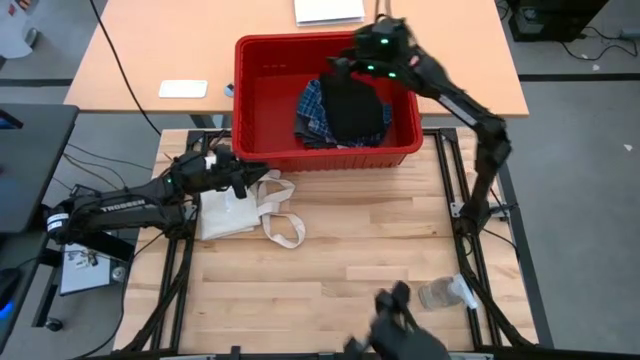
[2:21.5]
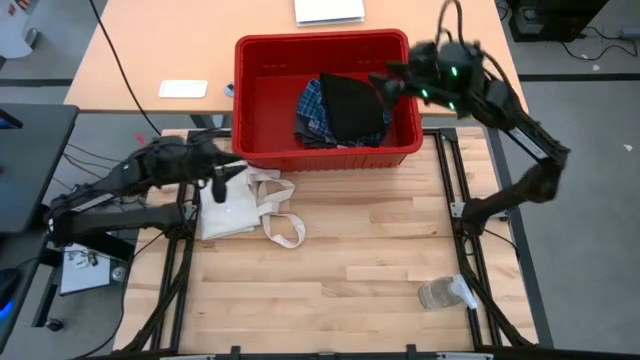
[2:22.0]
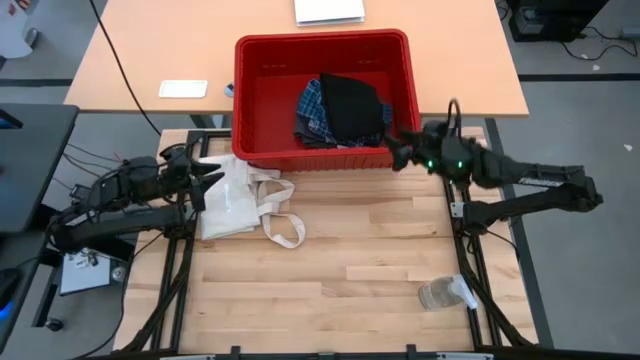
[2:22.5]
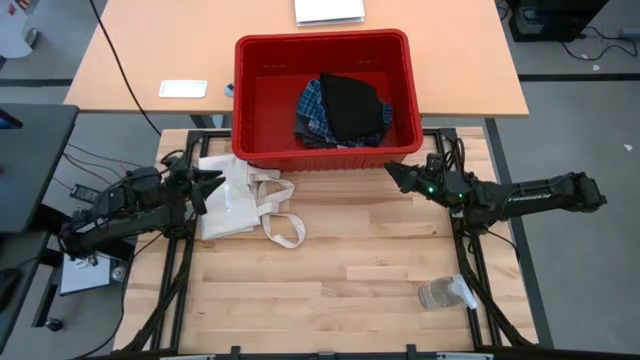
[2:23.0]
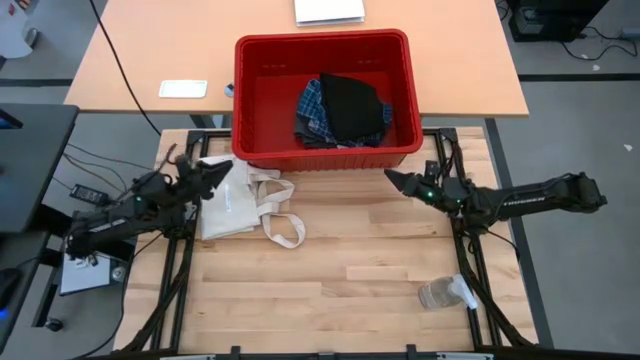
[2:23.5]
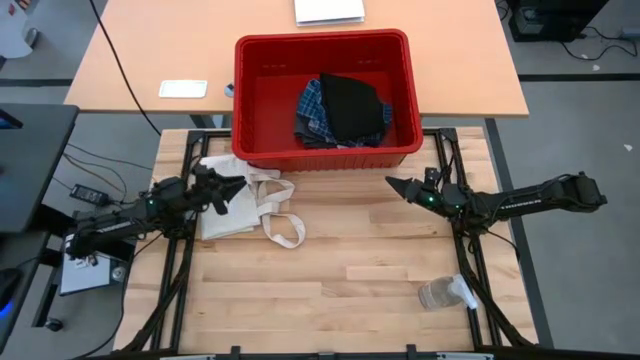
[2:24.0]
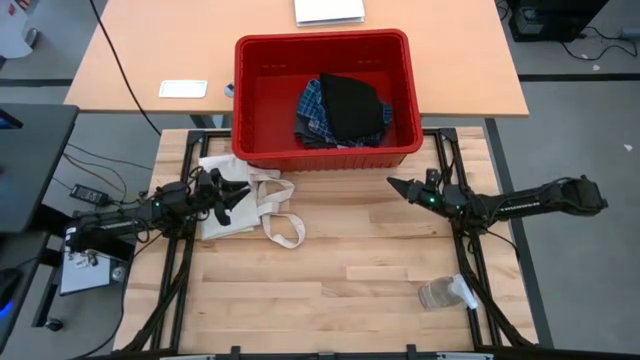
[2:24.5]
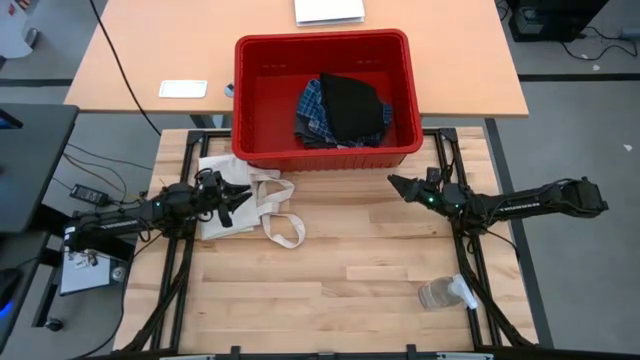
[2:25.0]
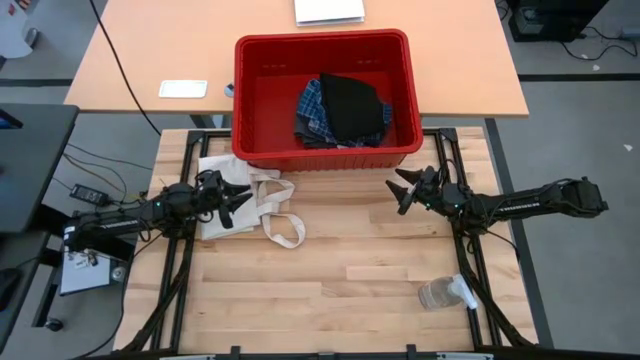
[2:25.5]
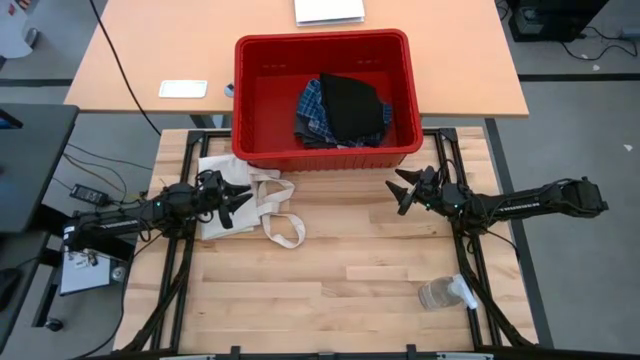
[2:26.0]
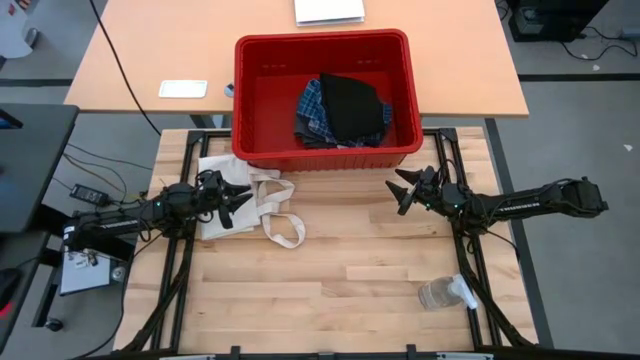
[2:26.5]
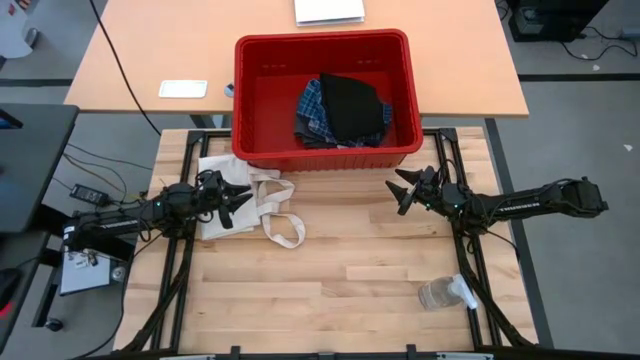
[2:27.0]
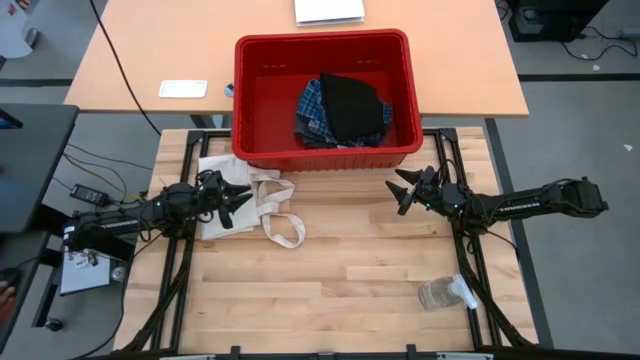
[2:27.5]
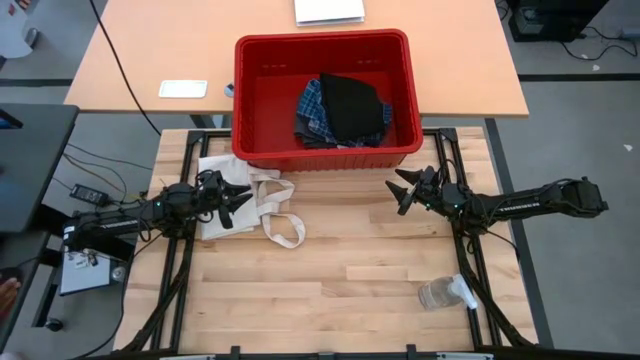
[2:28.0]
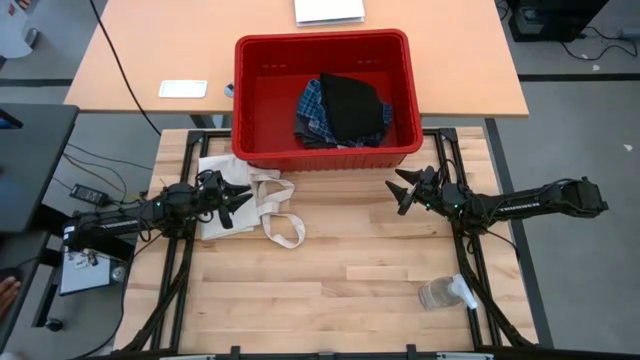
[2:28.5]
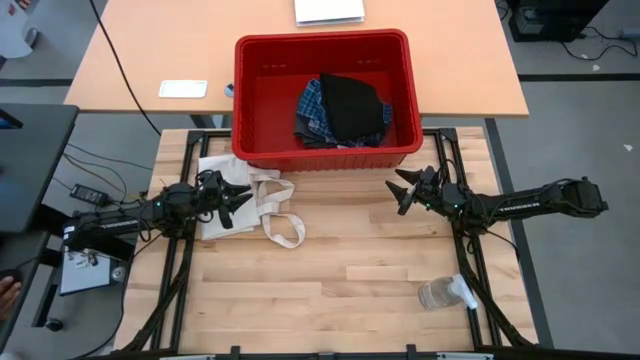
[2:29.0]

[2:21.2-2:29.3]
Task: Fold laundry
Return to Home Position

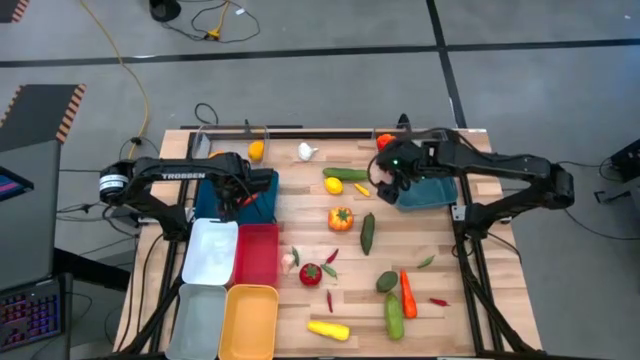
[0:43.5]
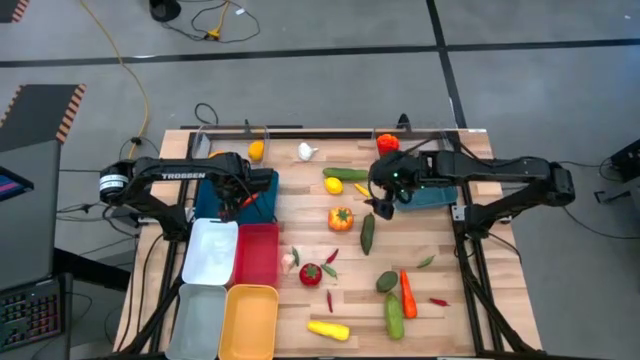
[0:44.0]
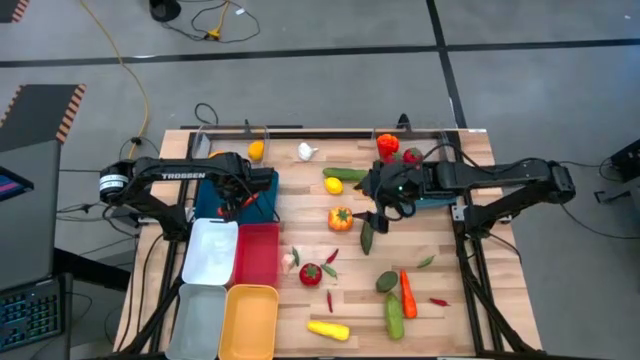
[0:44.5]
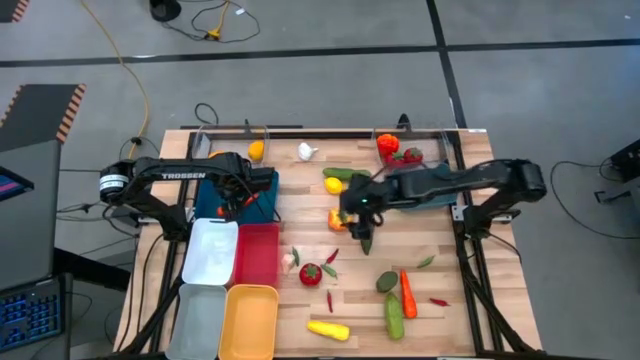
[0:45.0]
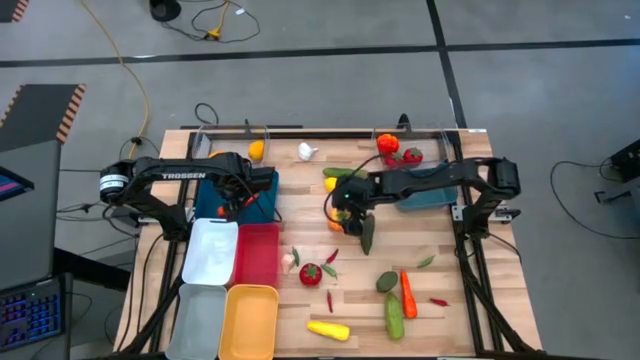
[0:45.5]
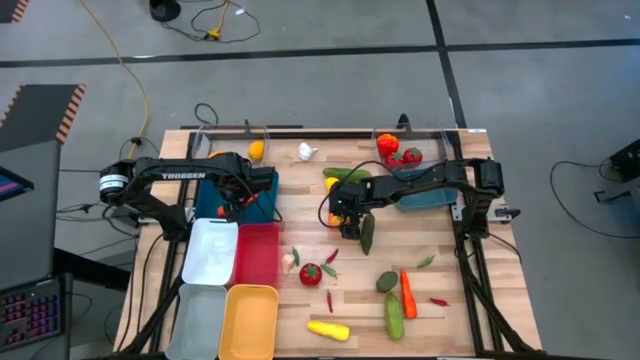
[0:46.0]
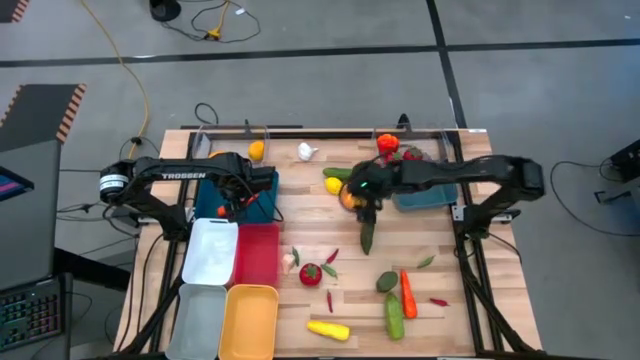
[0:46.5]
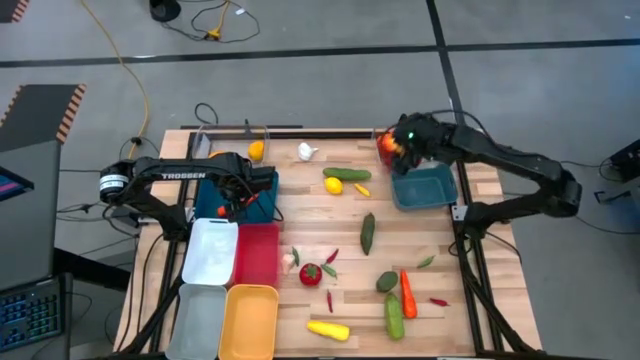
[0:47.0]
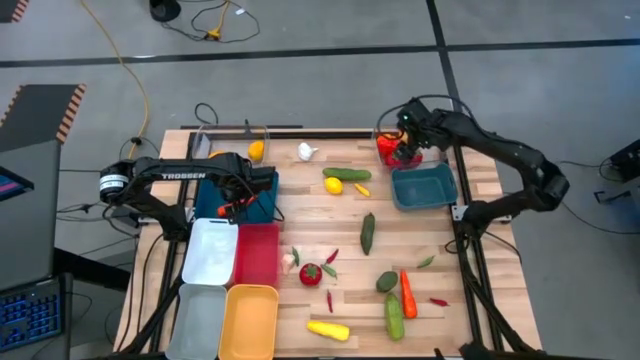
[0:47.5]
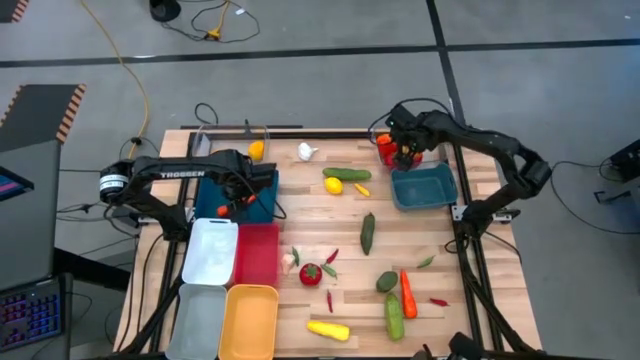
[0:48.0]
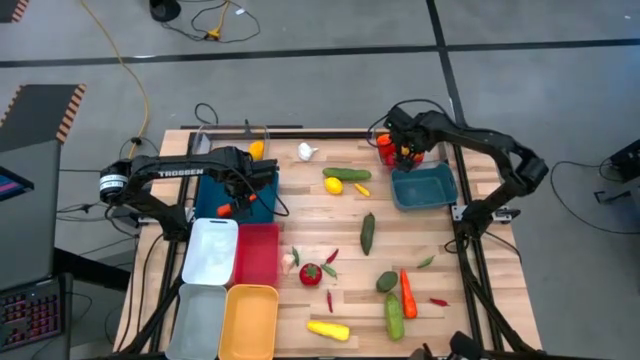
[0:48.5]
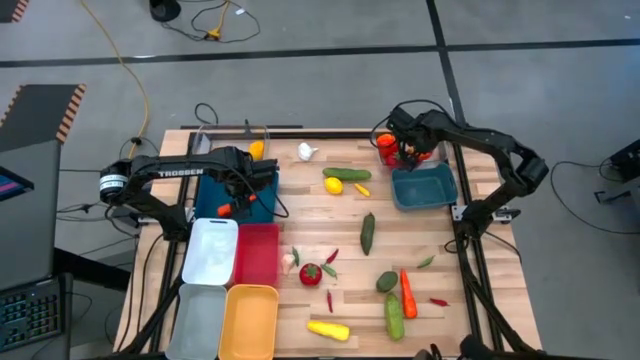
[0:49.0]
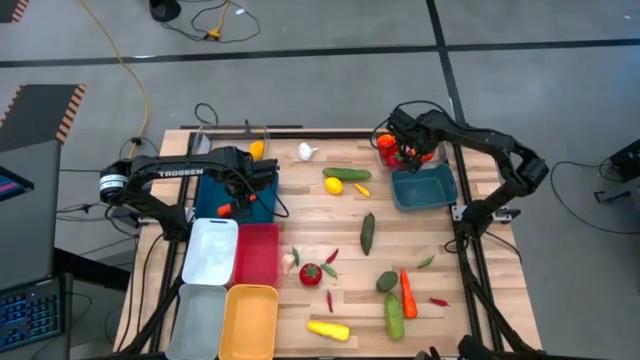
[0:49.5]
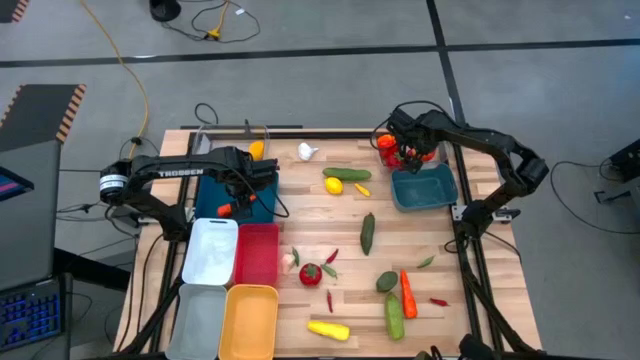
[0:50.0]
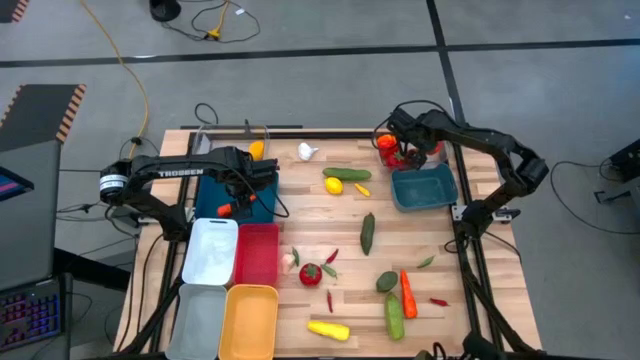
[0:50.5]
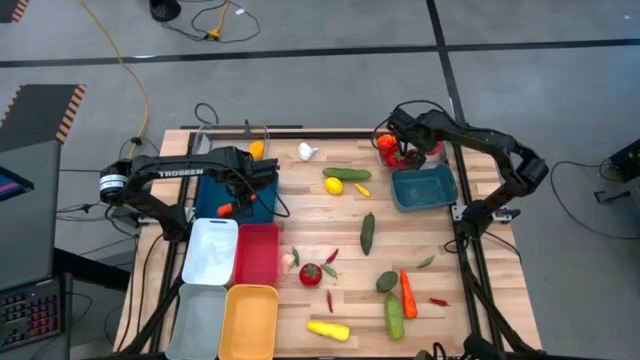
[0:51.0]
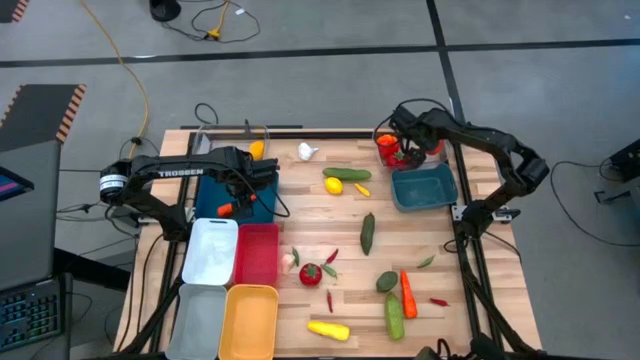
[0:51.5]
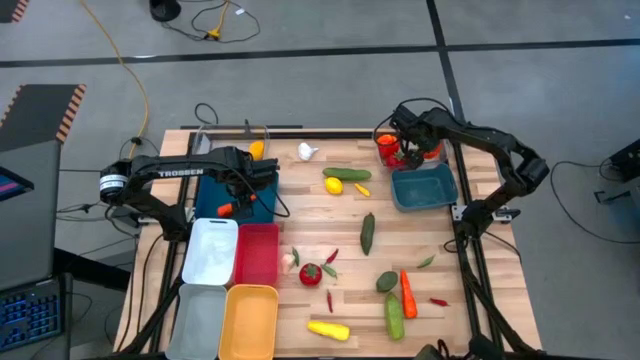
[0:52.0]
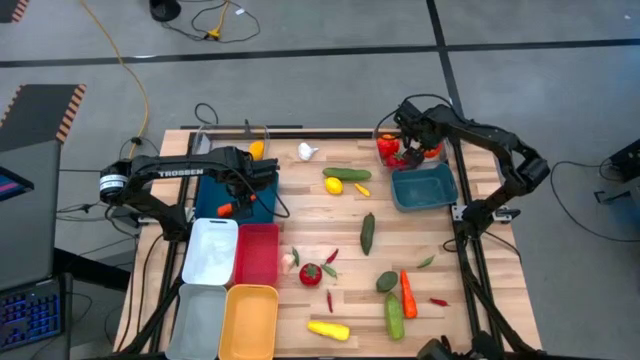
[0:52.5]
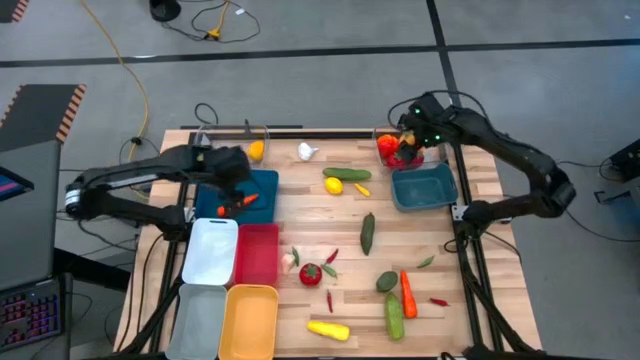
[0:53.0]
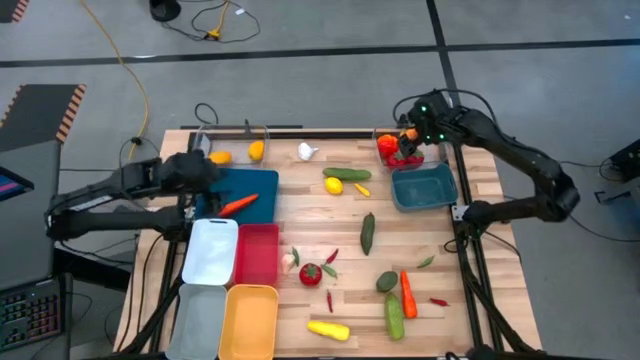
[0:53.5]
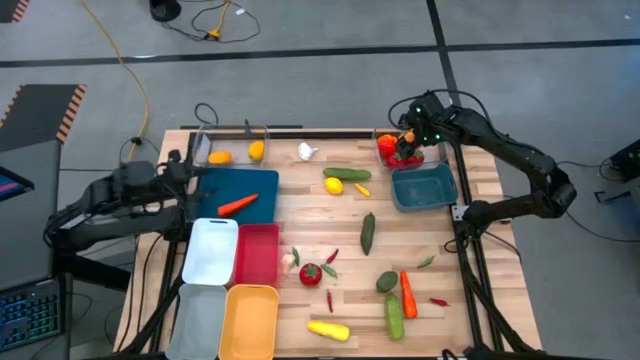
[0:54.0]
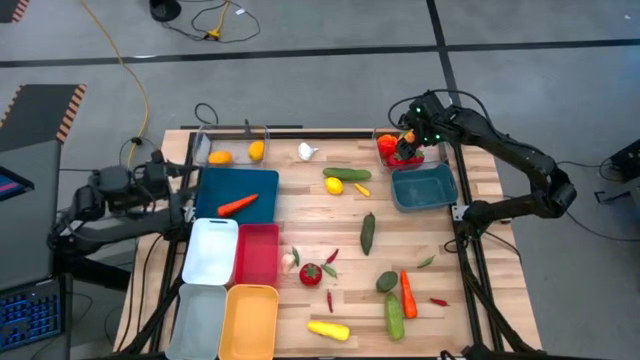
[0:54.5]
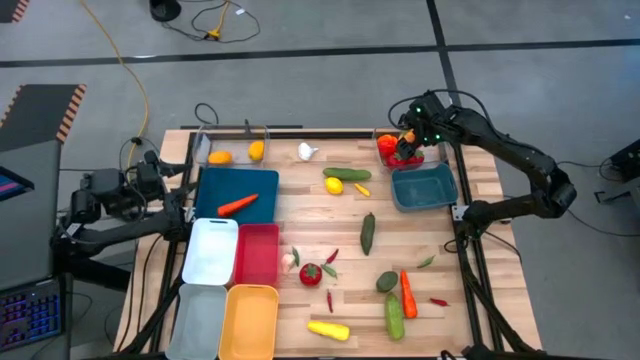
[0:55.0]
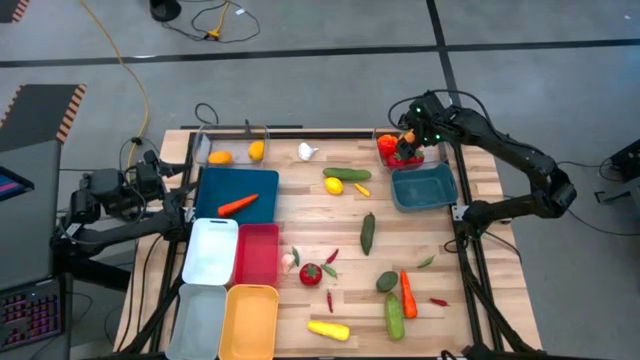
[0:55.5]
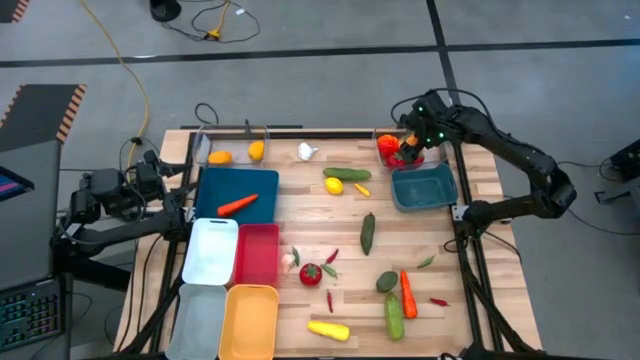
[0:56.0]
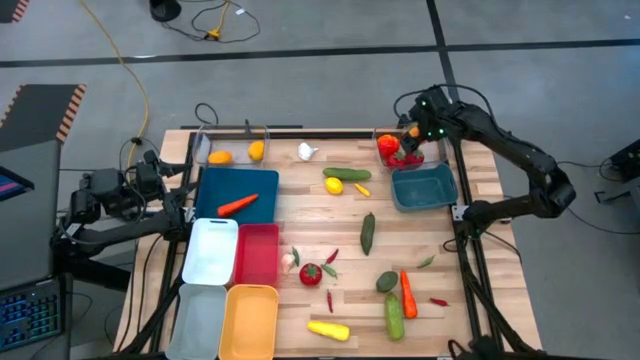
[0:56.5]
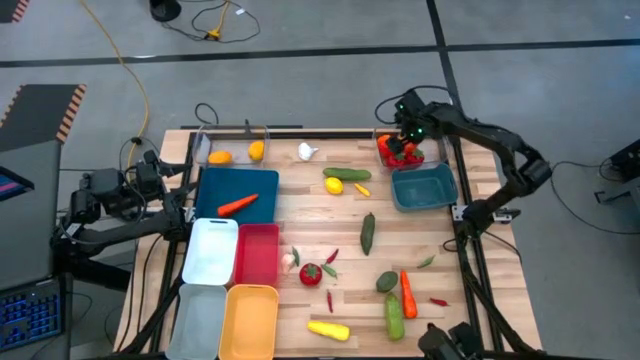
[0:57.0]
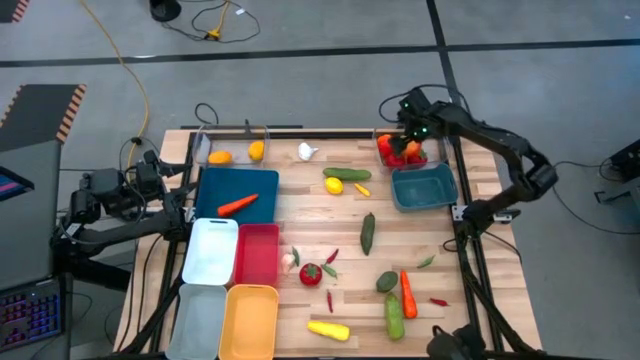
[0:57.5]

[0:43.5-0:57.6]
Task: Sort produce into baskets
Put the orange tomato into the right transparent bin
